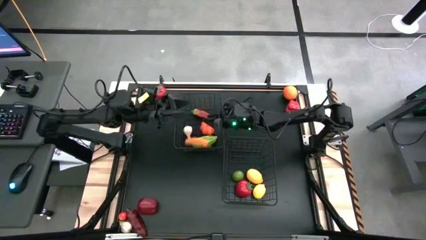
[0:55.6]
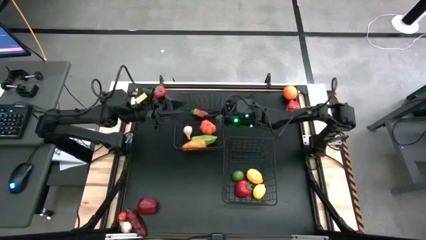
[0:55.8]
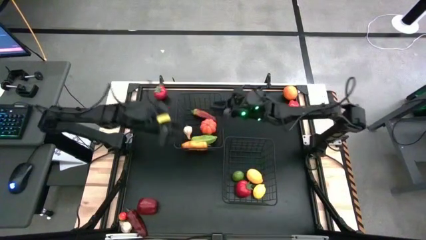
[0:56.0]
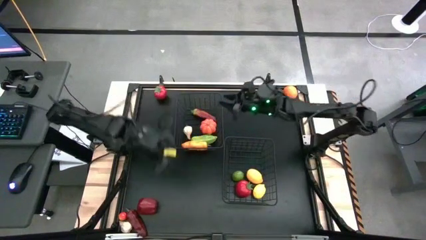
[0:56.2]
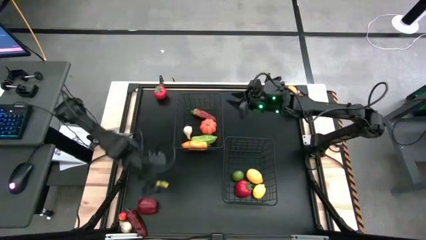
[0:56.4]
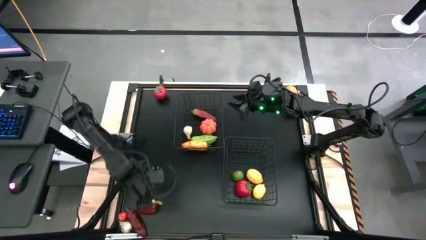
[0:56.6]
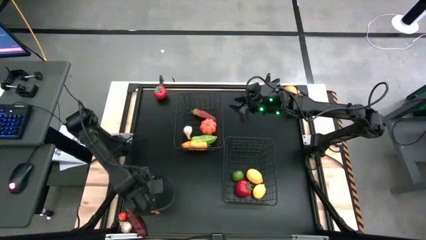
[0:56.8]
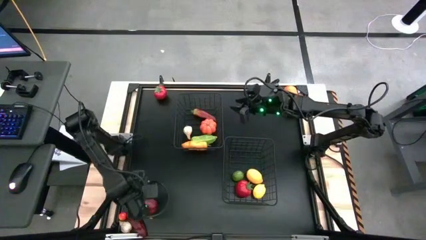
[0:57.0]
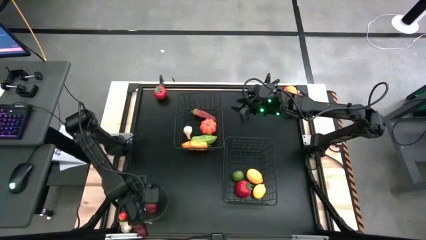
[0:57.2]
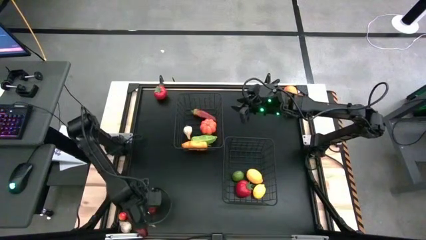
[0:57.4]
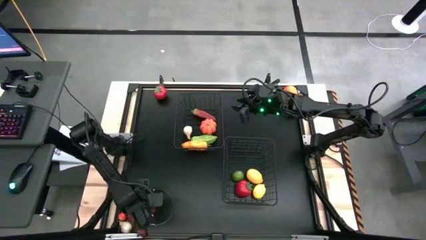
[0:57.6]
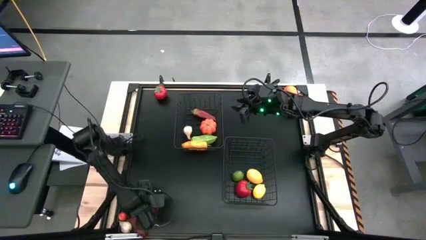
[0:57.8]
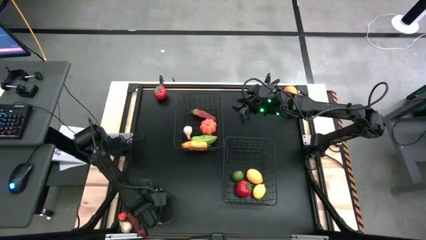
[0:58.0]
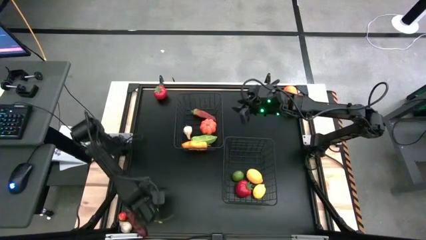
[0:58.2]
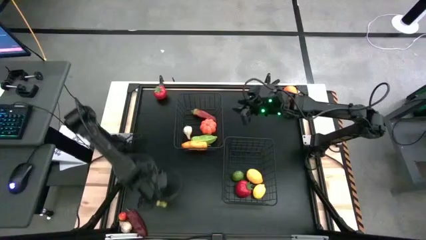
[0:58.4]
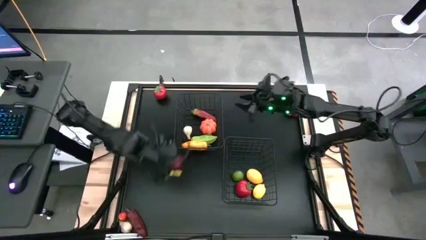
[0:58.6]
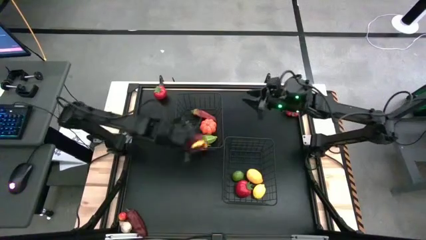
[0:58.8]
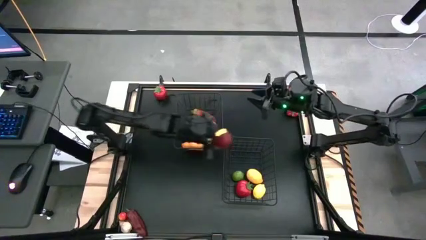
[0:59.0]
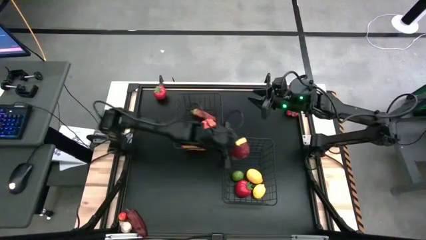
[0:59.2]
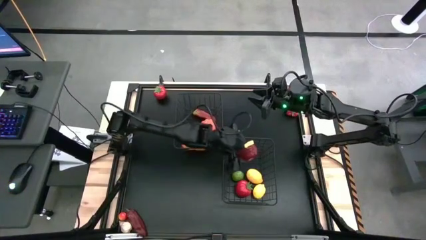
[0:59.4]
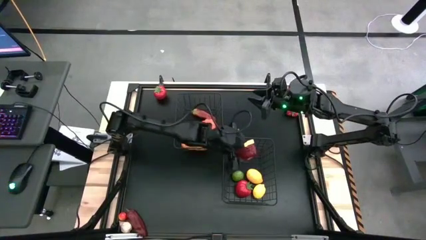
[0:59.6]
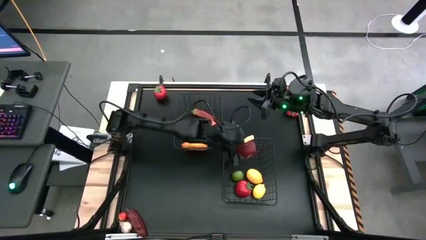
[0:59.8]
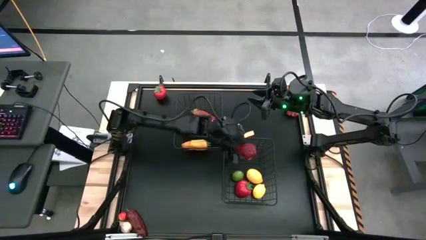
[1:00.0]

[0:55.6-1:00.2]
Task: Sort produce into baskets
Put the bottom red bell pepper into the bottom black wire basket

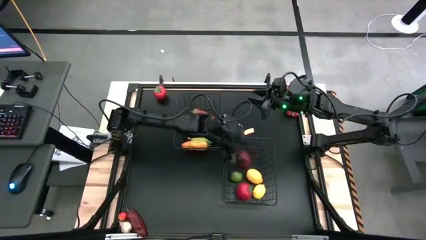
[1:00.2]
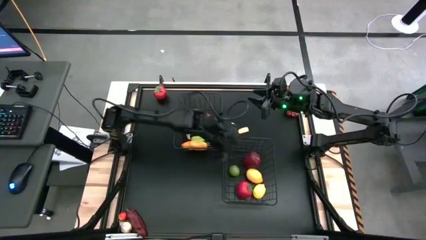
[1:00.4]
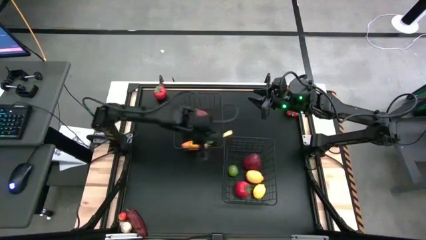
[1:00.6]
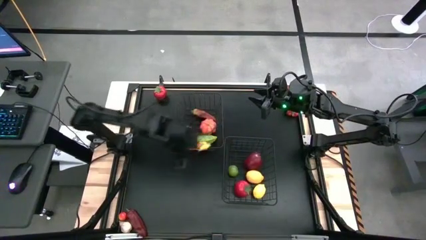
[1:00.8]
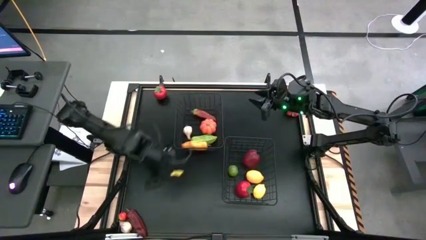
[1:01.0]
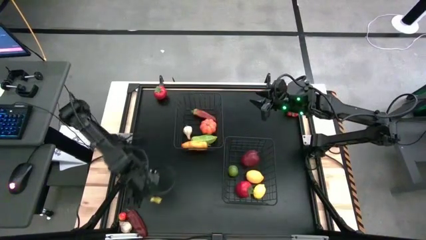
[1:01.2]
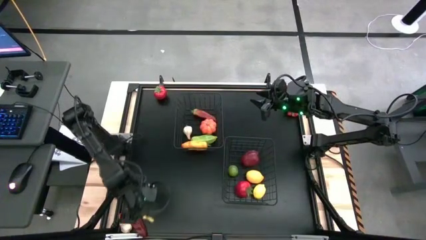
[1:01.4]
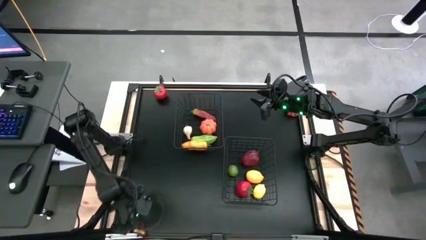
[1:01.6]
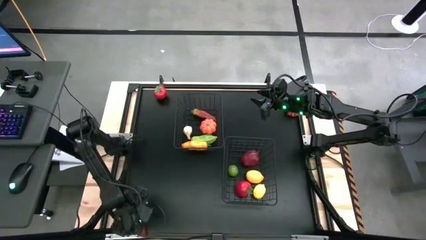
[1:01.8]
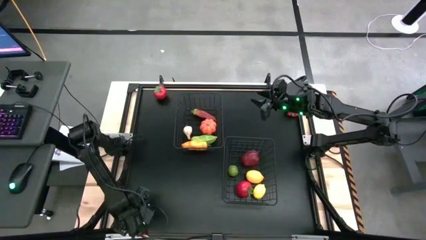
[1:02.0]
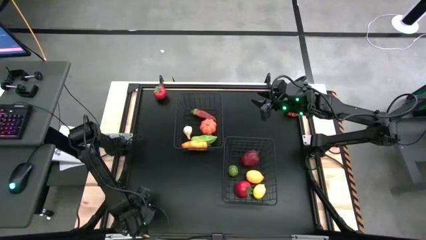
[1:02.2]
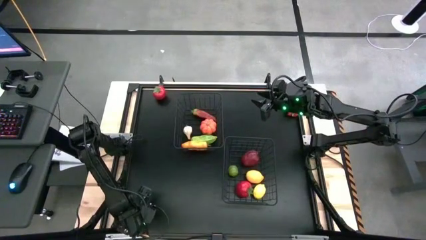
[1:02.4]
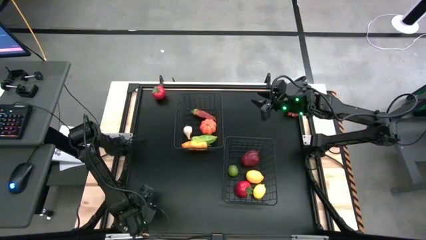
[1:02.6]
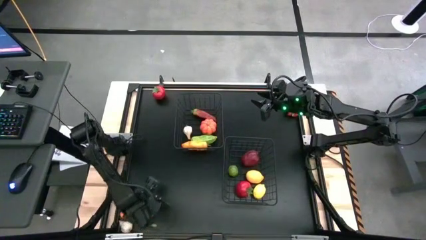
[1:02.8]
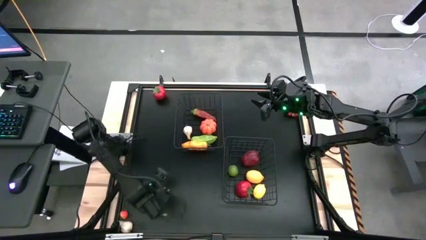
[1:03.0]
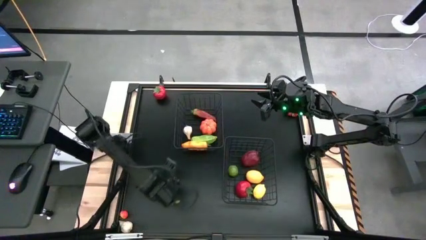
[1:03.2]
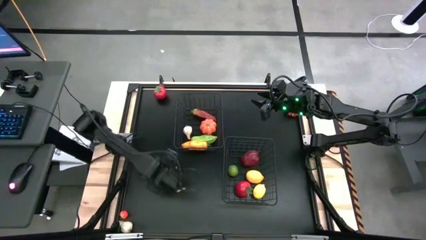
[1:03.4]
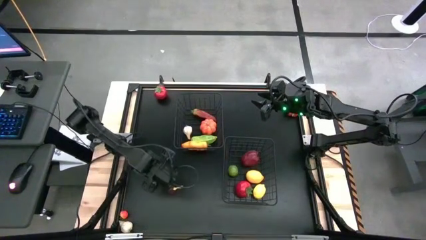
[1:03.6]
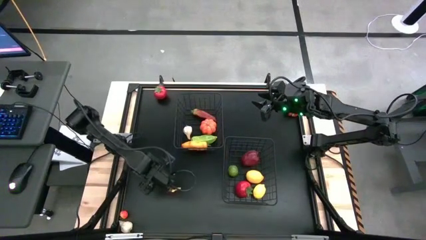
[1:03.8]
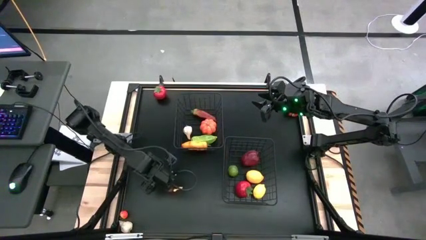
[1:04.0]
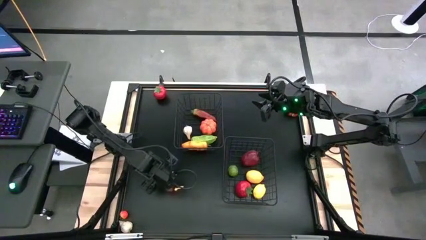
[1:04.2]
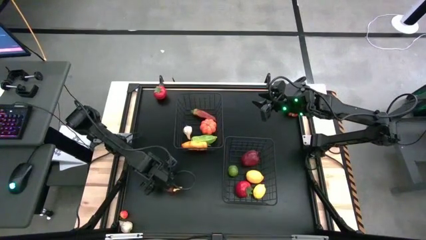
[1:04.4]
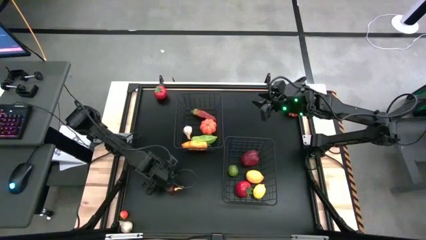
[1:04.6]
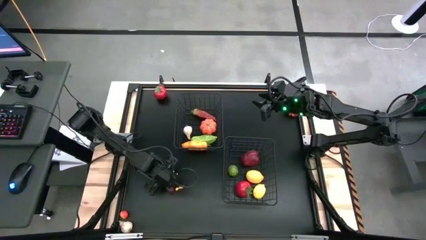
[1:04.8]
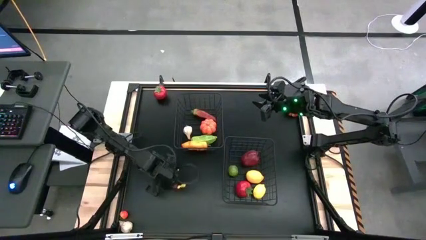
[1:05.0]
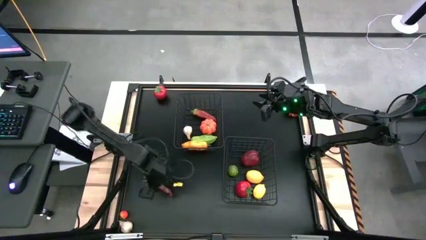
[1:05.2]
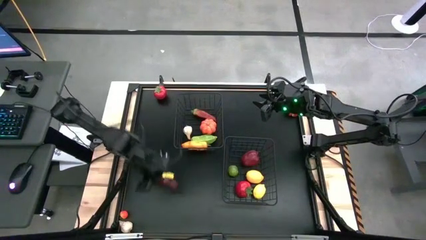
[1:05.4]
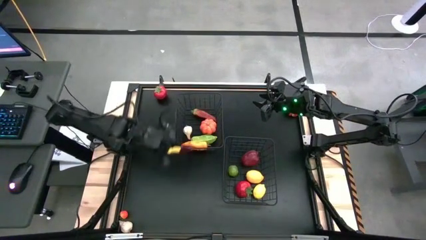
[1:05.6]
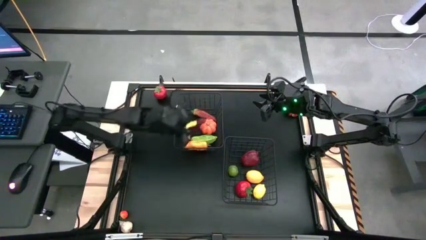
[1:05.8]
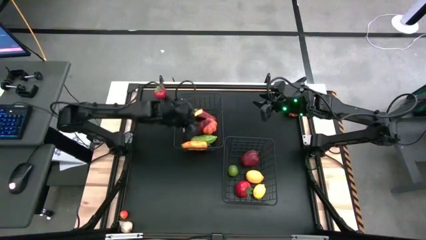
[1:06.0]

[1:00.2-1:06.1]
Put the red chili pepper into the top black wire basket

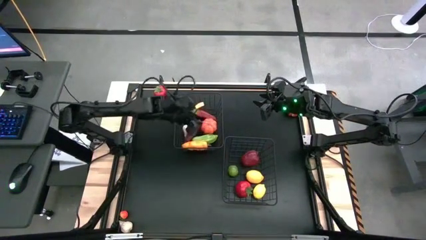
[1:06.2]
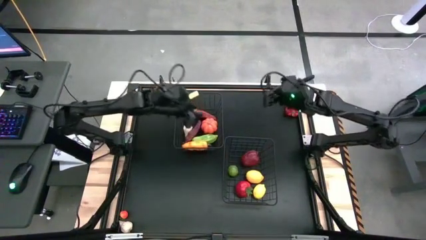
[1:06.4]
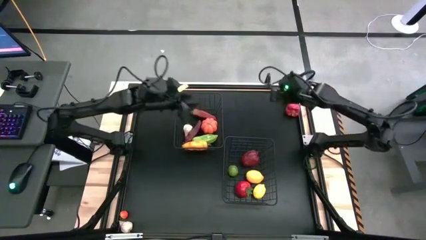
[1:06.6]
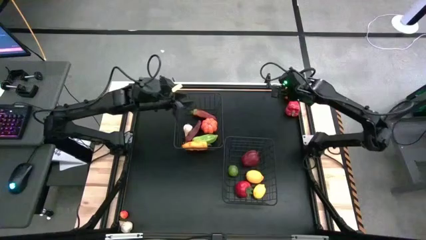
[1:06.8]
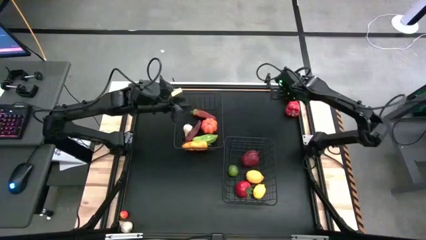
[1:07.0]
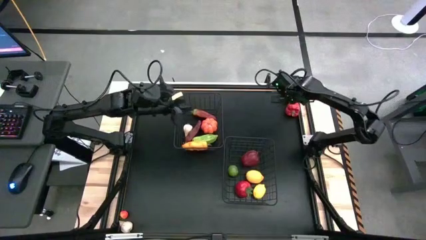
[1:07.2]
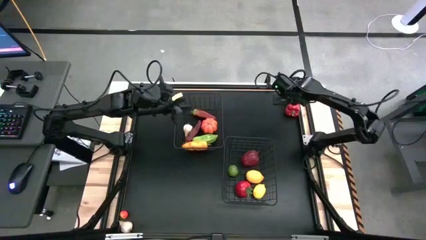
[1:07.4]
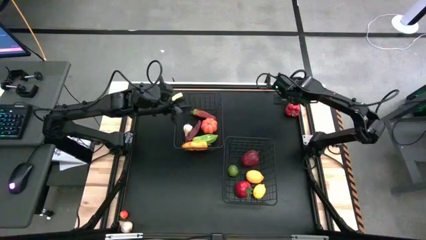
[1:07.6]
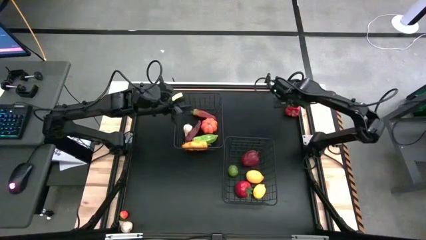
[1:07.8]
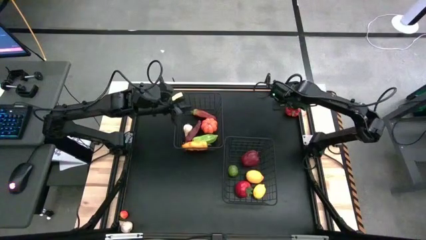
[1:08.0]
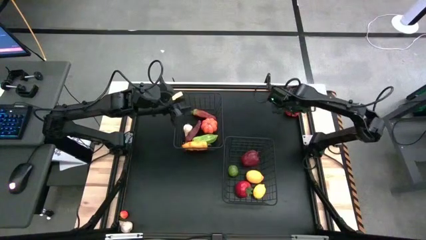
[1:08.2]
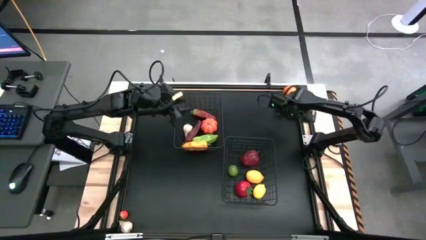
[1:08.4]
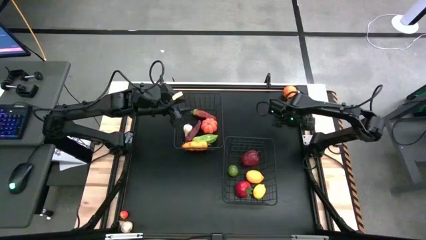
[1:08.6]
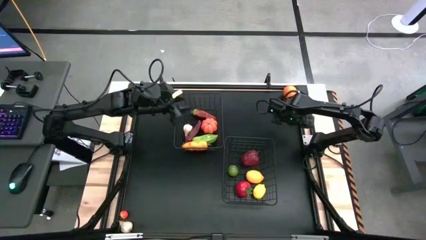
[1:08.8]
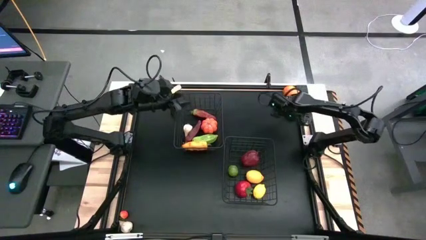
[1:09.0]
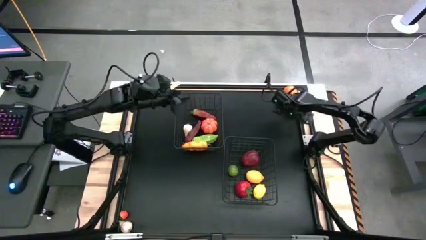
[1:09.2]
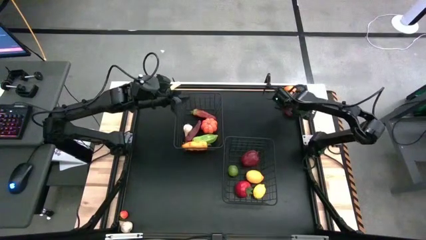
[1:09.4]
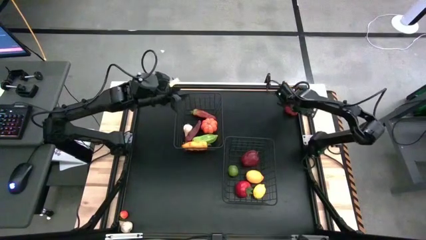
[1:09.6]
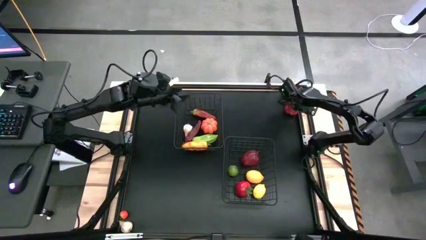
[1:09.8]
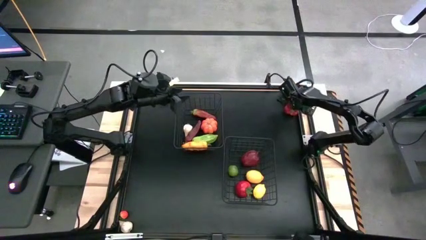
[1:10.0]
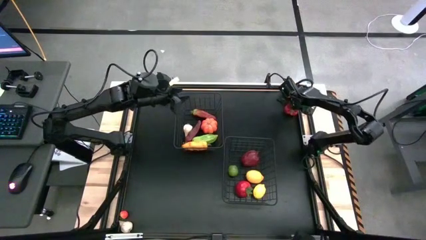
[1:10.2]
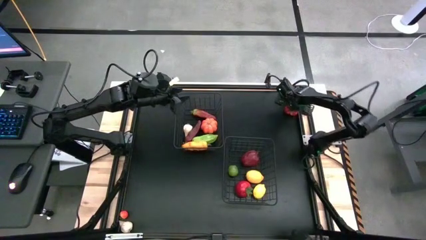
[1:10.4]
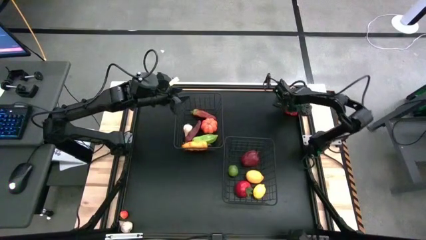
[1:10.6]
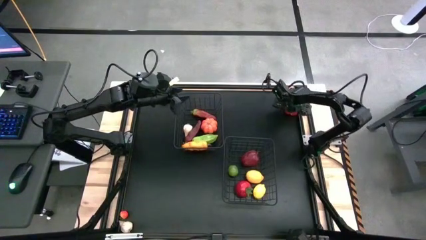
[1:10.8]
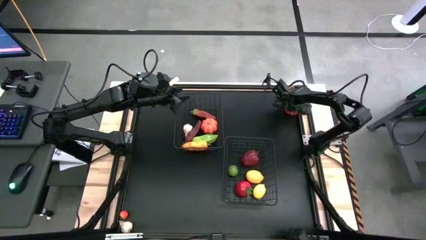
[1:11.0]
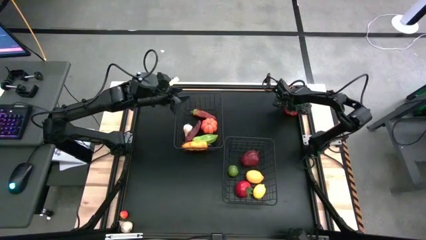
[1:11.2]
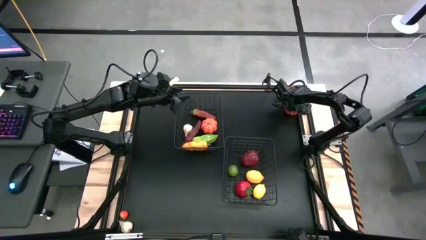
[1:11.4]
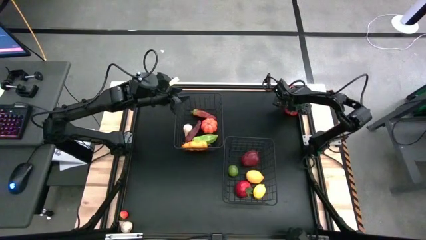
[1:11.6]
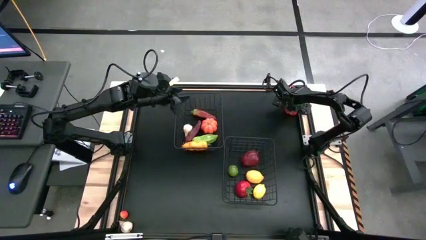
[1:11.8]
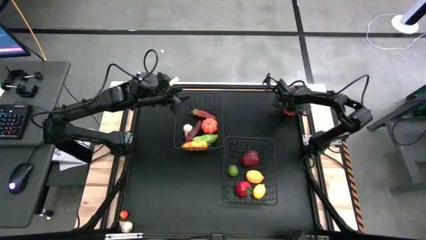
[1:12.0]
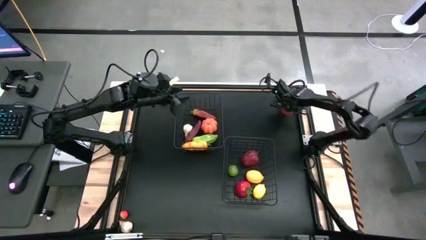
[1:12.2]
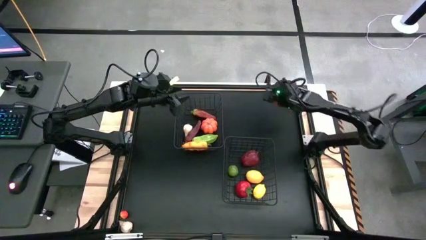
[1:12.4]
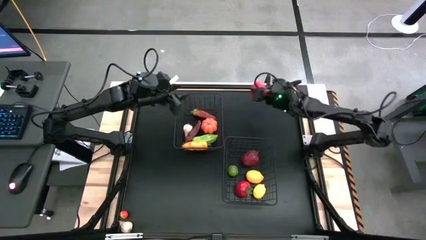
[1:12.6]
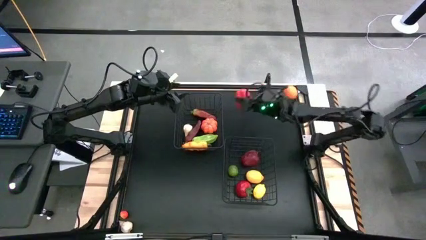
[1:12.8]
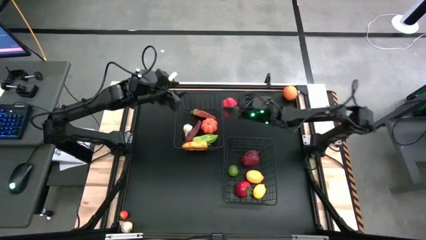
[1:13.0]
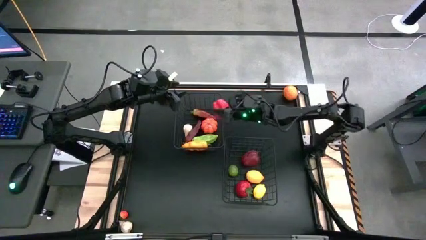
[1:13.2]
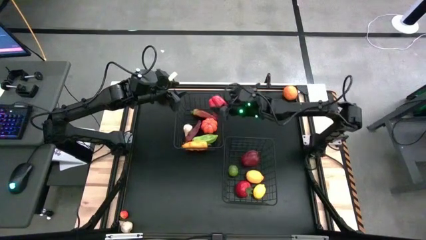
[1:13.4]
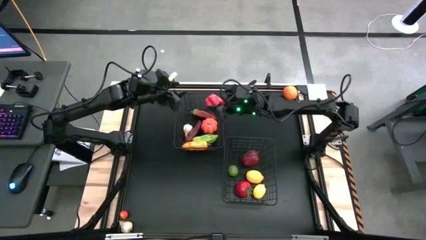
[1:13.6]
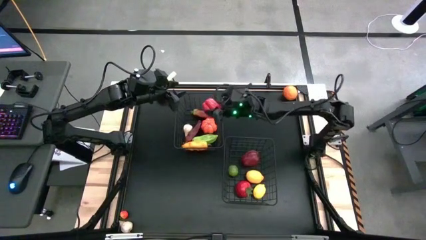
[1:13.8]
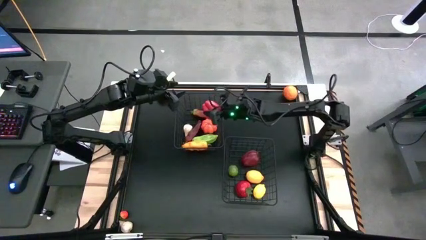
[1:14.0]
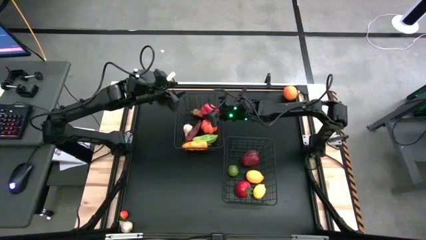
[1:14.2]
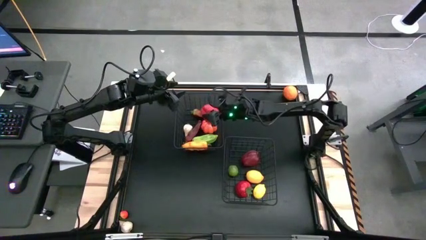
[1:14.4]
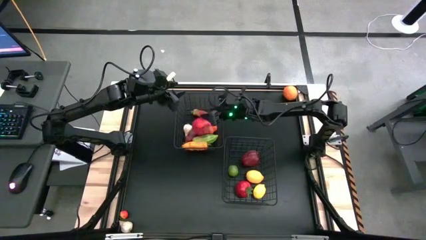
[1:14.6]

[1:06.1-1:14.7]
Put the red bell pepper into the bottom black wire basket
